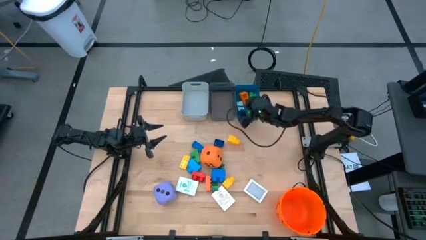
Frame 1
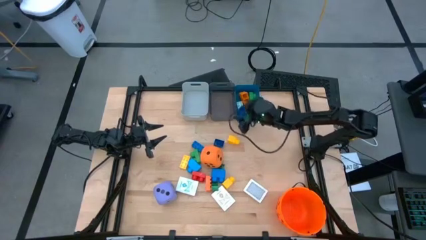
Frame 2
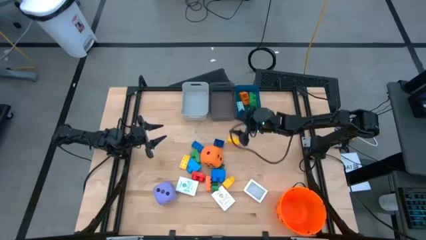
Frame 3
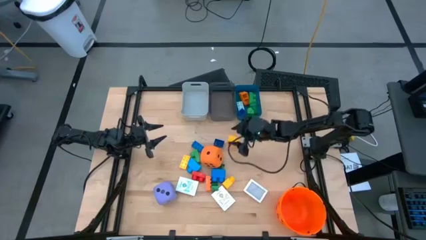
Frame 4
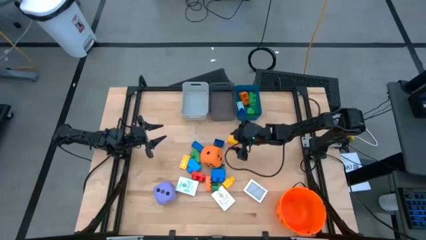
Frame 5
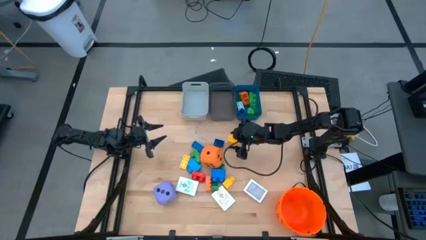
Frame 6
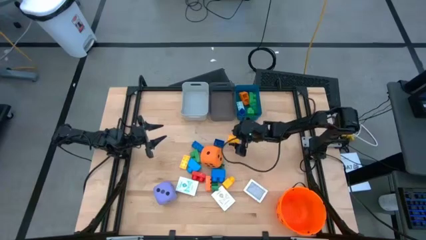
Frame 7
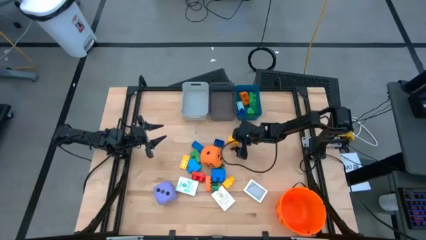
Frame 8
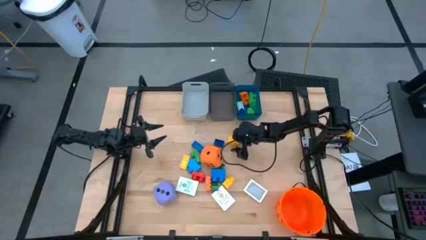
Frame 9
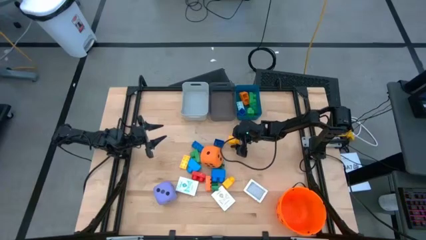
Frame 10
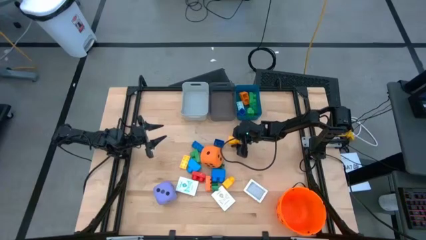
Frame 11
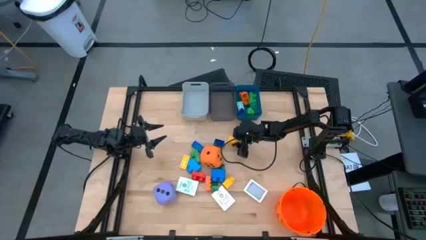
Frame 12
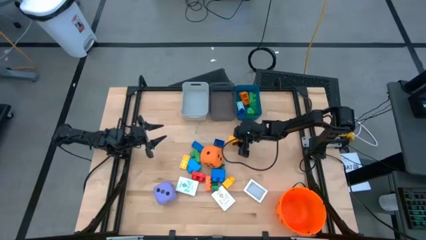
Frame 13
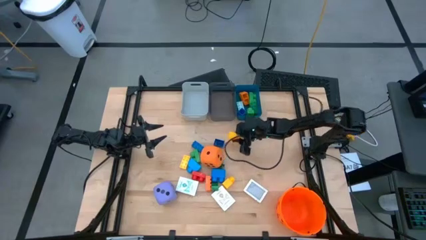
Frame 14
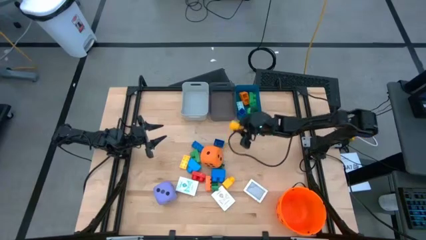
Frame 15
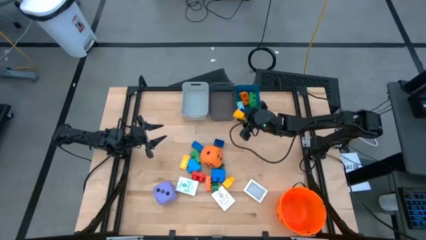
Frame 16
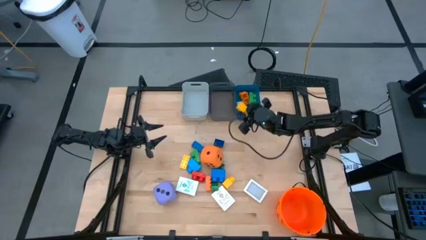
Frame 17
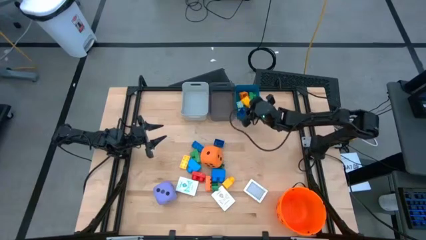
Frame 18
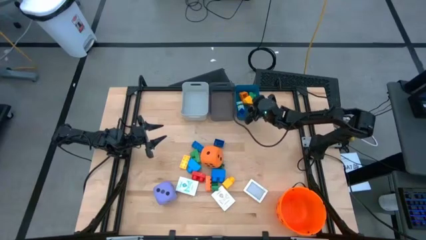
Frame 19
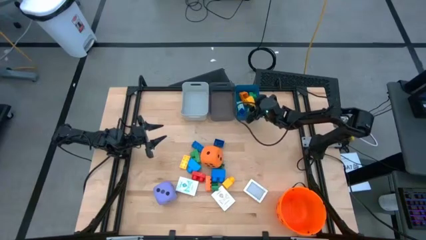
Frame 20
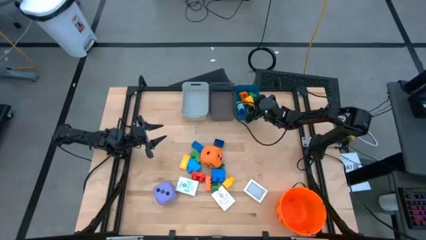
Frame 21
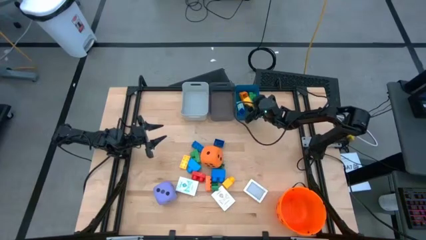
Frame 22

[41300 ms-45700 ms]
Task: Pick & Place Toys
Put the yellow game piece into the blue bin

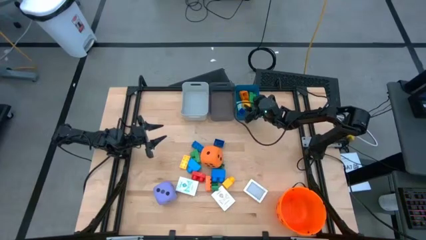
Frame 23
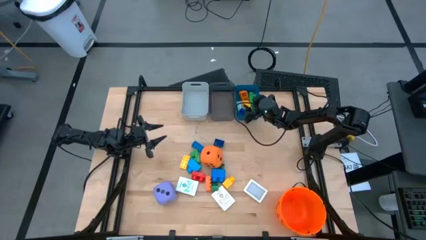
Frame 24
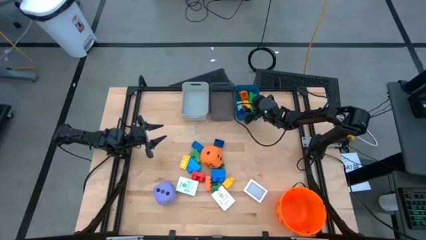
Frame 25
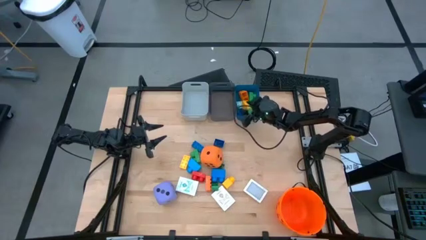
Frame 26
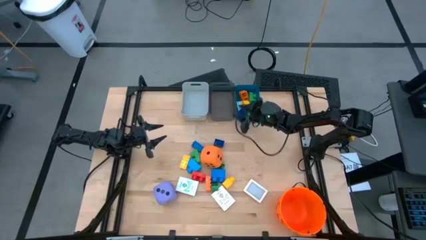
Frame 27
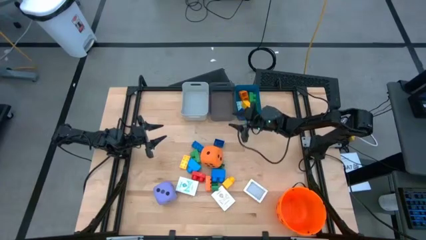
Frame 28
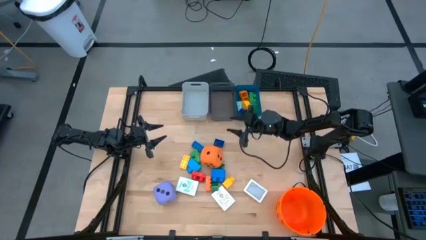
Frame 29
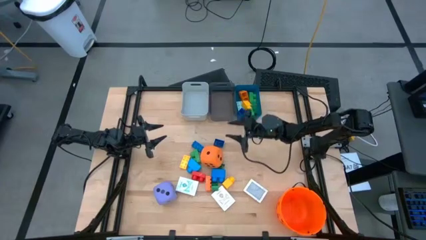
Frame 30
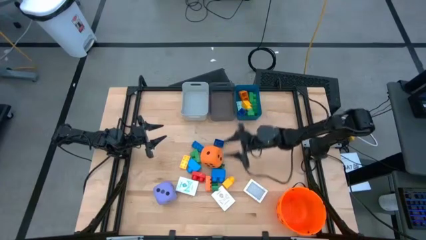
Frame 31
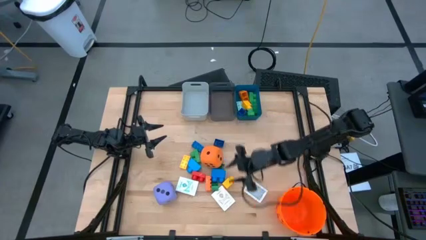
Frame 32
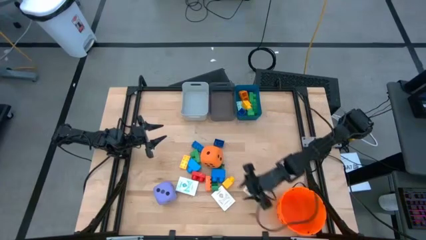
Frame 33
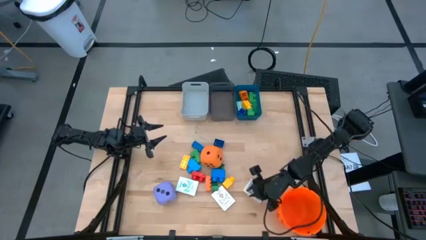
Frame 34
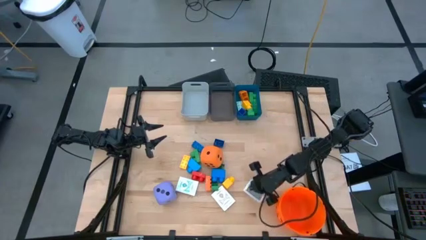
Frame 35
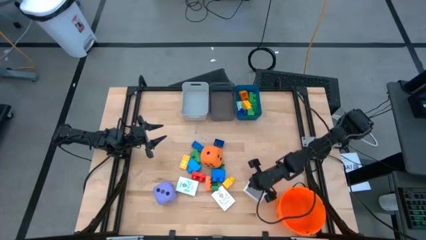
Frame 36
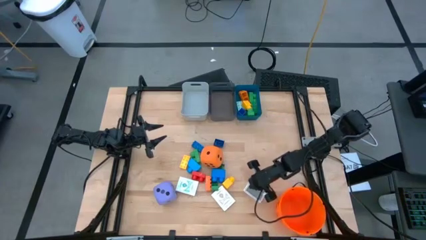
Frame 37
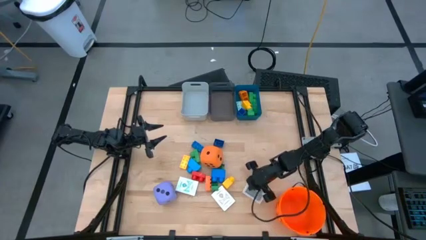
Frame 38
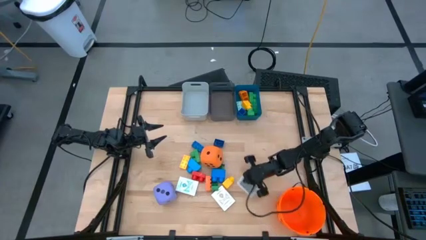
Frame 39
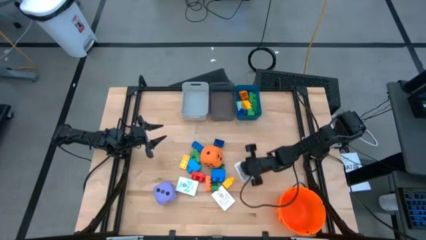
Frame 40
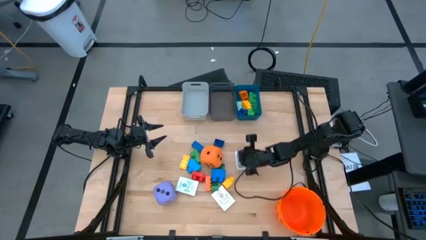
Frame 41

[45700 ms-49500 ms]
Move the green playing cards to the center of the table

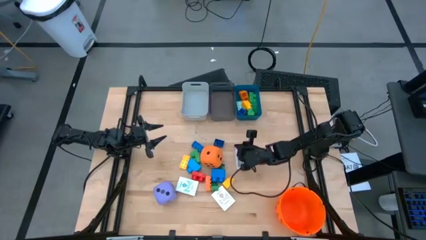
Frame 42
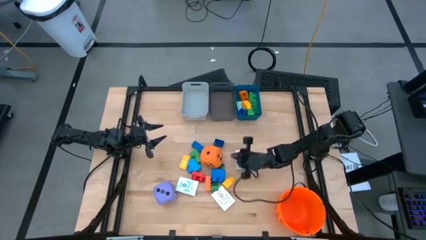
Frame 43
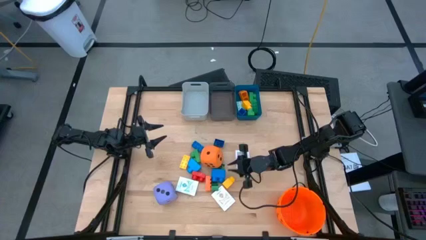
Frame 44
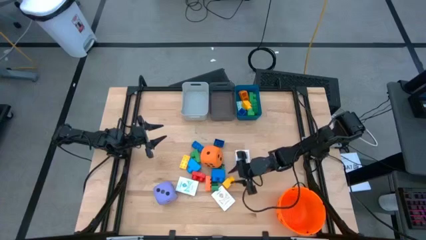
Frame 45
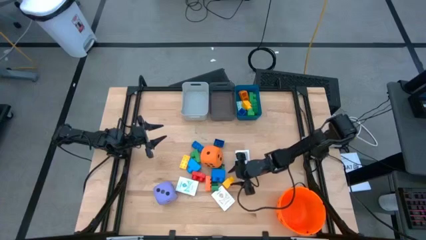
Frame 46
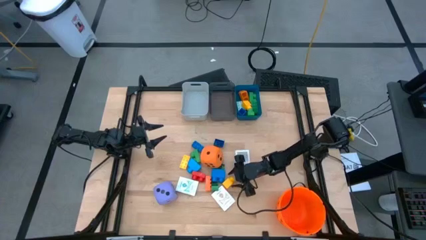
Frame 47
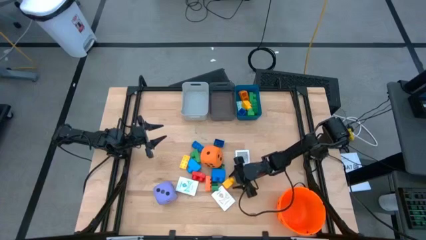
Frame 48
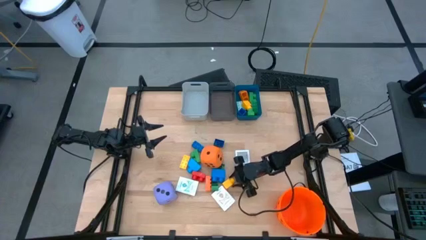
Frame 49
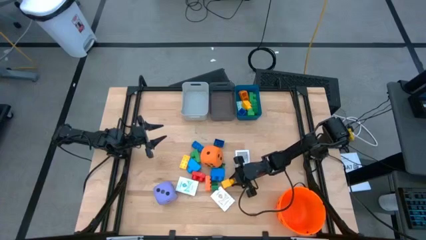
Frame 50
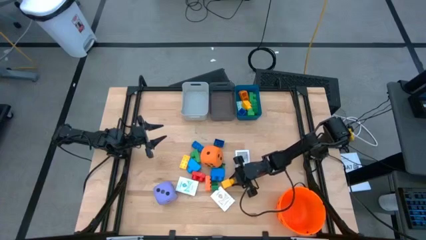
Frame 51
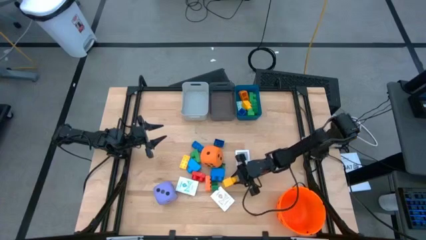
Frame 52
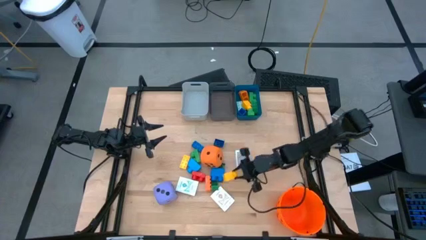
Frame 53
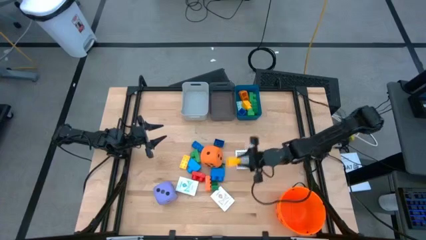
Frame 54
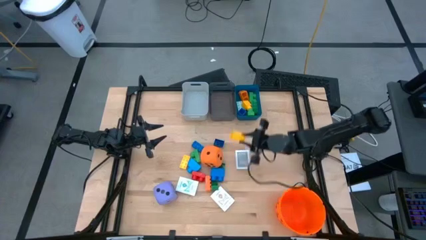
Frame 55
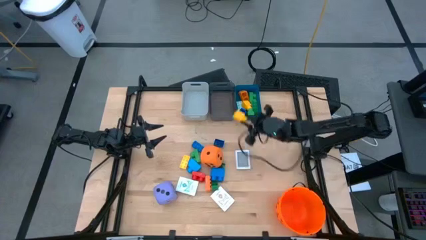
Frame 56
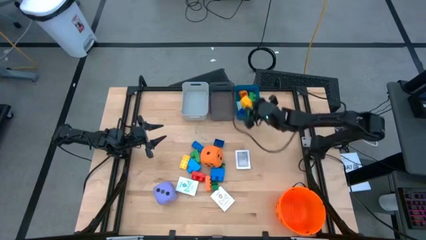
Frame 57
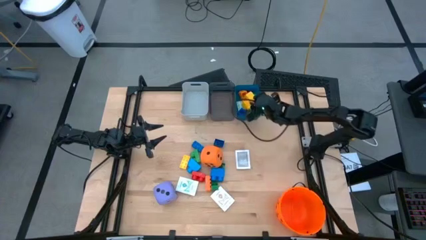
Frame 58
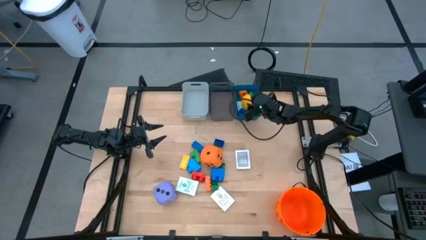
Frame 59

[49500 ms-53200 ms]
Put the yellow game piece into the blue bin

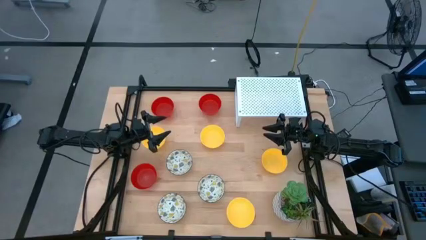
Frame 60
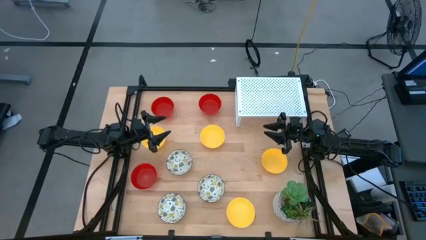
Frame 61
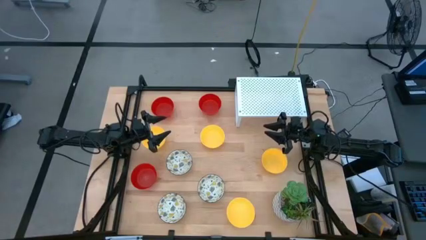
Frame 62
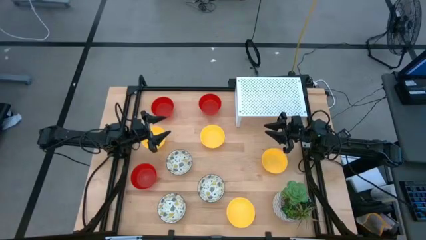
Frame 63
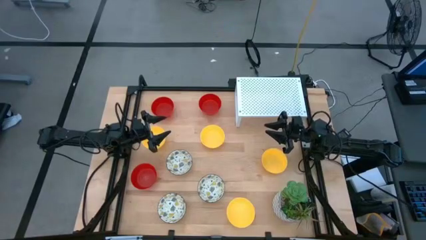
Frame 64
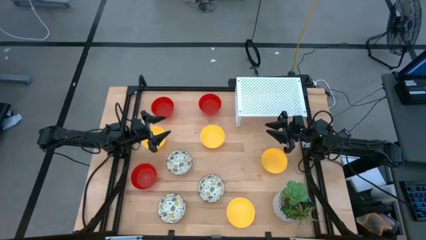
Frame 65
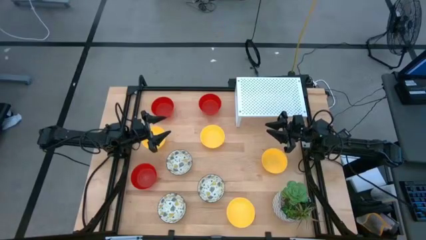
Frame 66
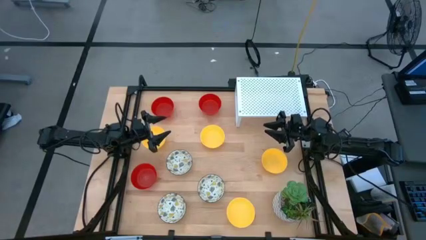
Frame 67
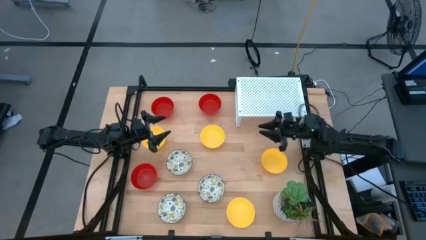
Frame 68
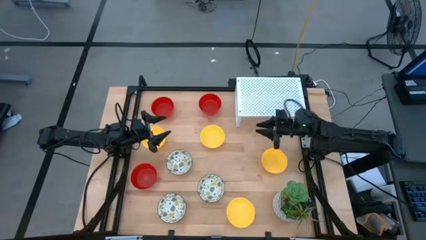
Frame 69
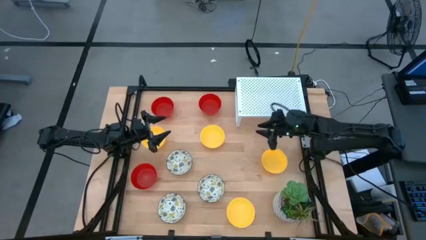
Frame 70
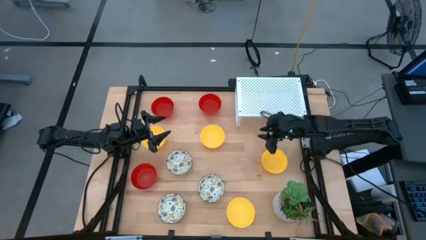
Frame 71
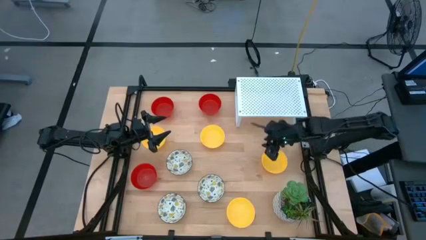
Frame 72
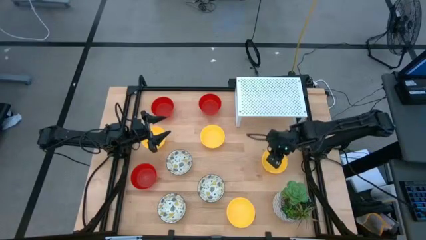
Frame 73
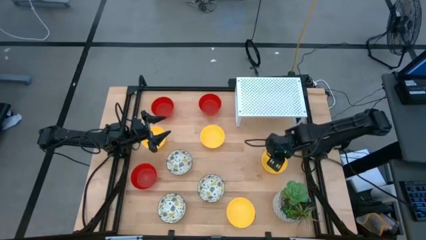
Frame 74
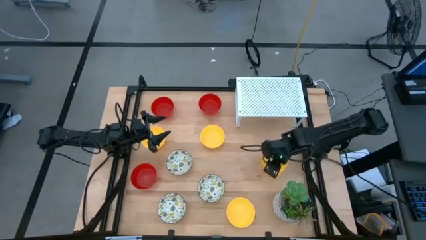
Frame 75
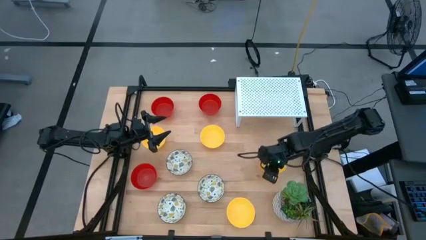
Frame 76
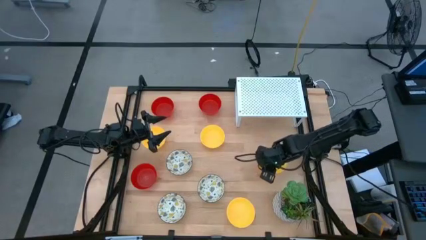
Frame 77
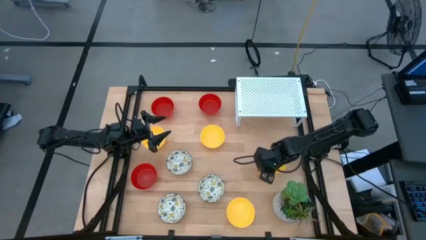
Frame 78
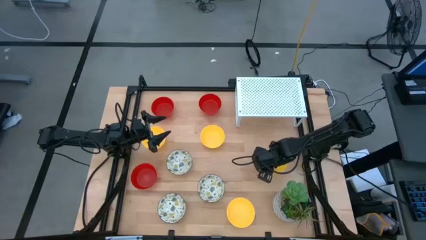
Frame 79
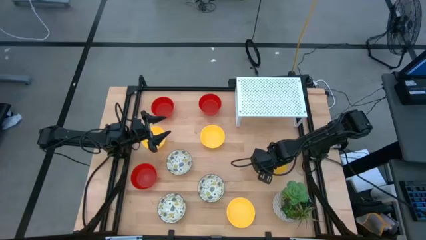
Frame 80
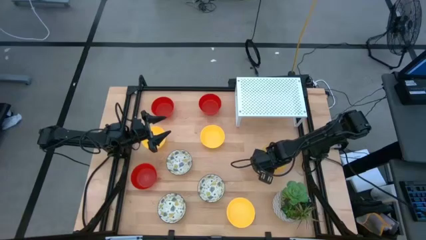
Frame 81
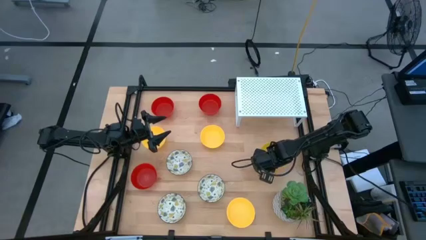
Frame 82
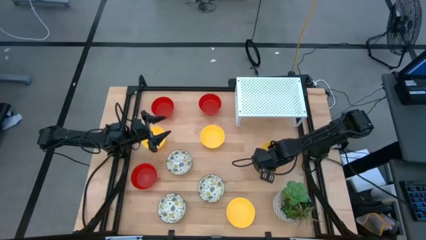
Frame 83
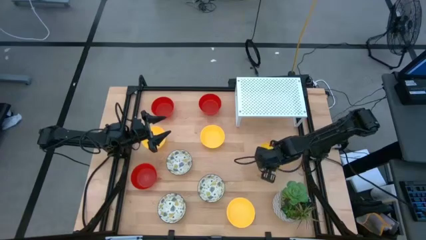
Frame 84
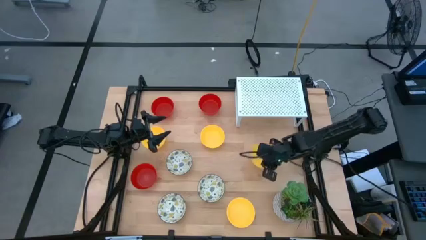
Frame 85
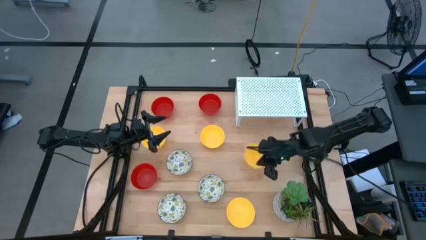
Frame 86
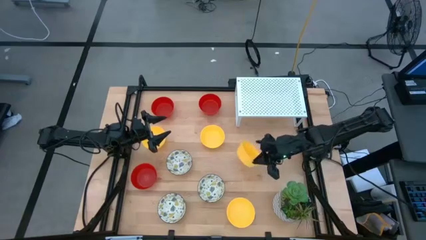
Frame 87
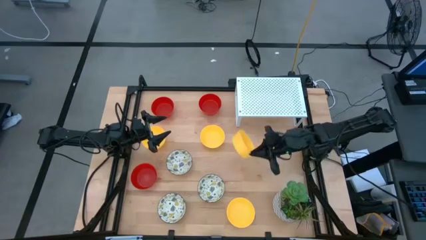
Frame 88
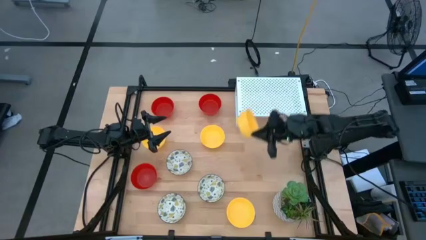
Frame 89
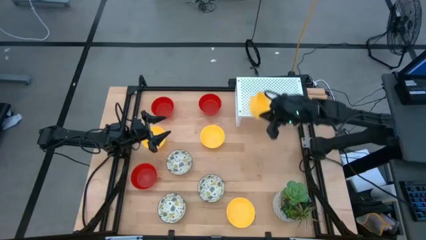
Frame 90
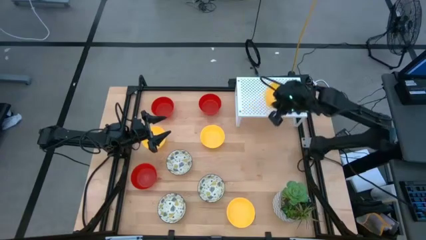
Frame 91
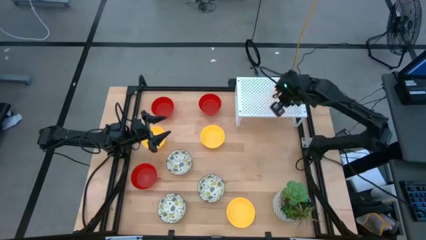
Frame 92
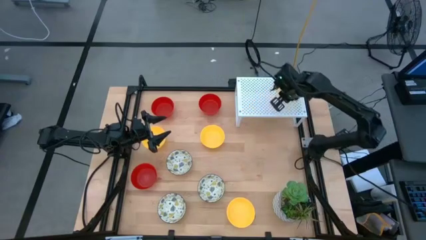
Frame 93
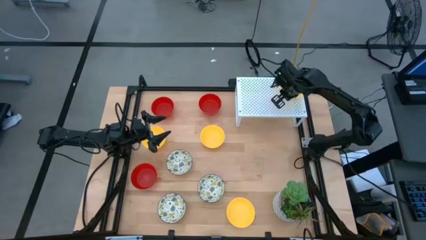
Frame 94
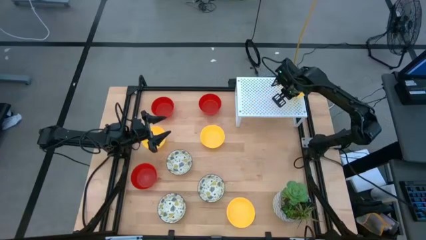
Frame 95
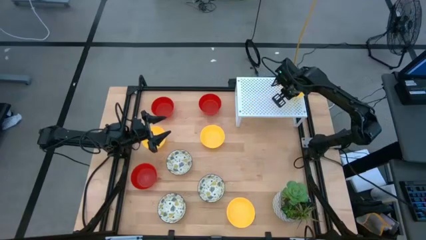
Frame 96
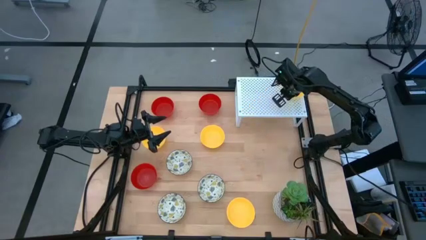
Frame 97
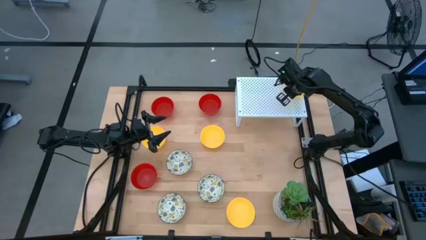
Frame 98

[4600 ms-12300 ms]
Task: Pick & Place Mini bowls
Put the yellow bowl on the shelf
